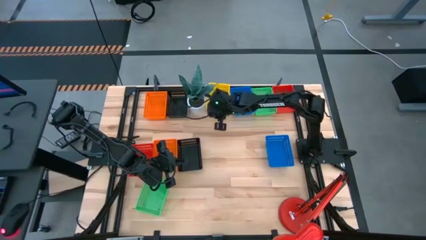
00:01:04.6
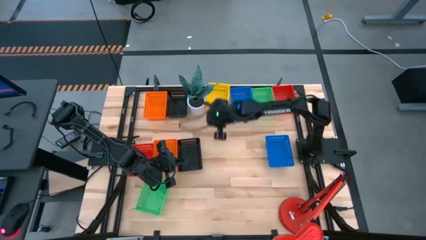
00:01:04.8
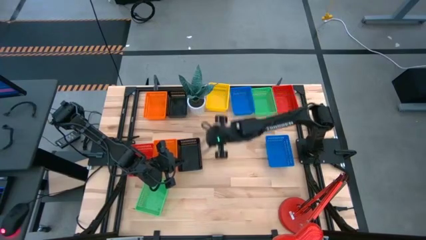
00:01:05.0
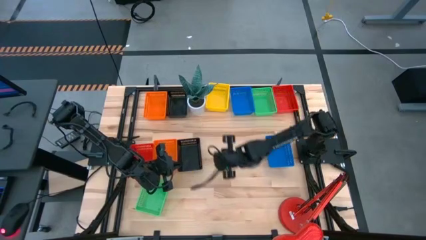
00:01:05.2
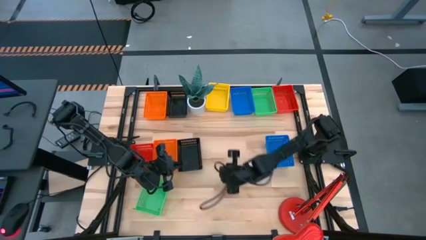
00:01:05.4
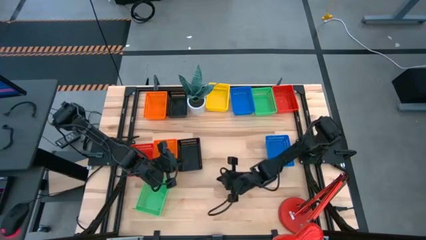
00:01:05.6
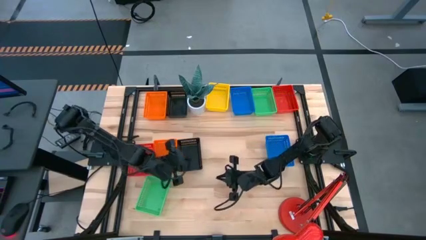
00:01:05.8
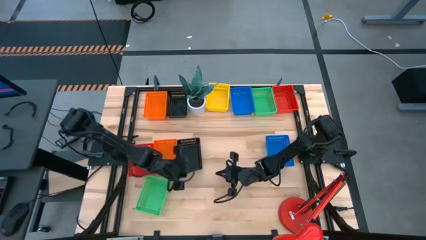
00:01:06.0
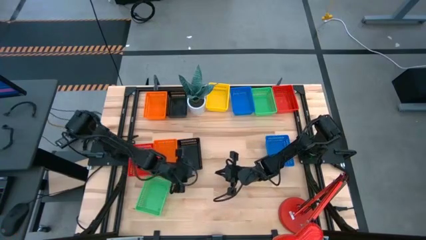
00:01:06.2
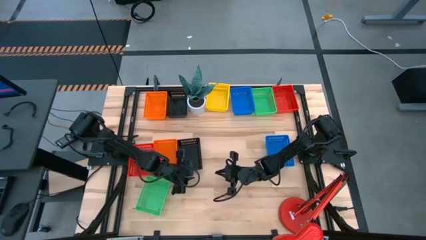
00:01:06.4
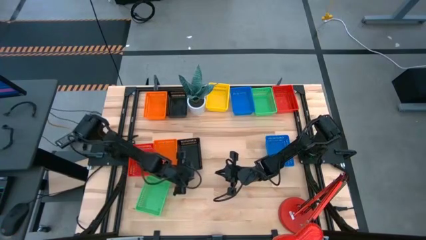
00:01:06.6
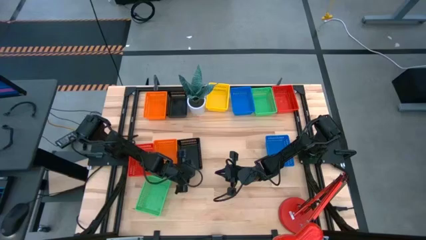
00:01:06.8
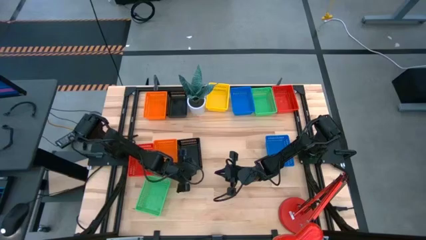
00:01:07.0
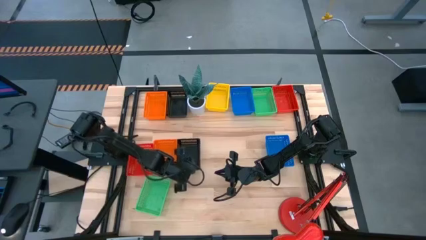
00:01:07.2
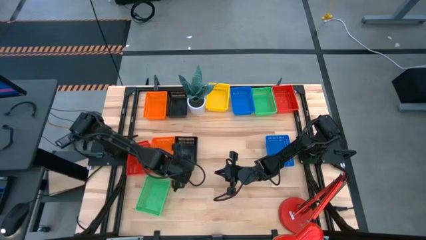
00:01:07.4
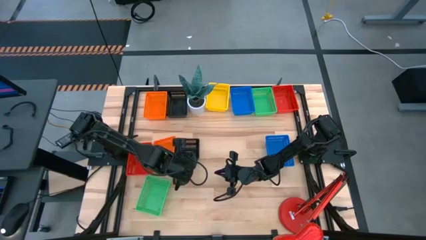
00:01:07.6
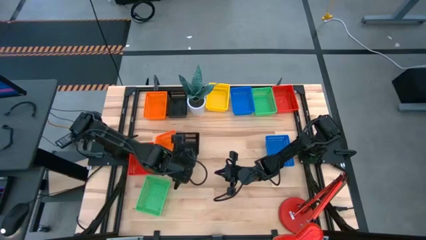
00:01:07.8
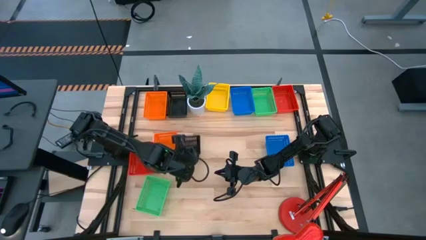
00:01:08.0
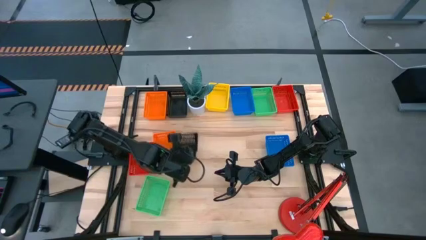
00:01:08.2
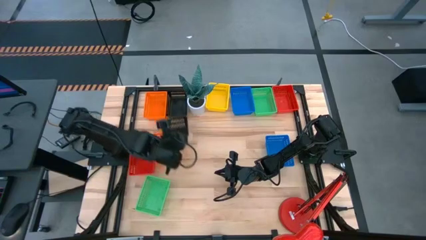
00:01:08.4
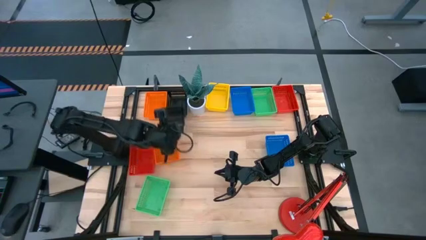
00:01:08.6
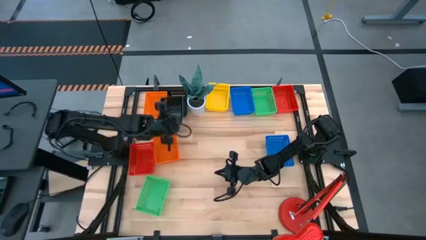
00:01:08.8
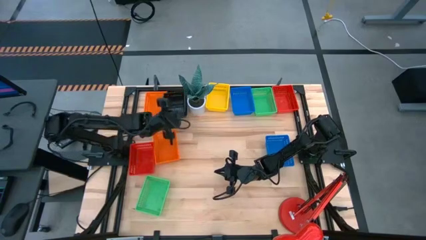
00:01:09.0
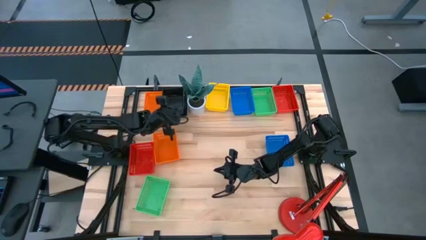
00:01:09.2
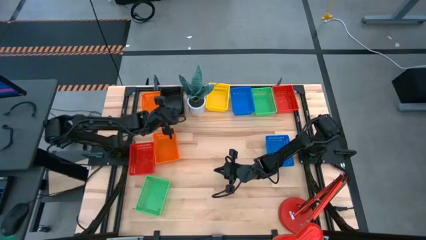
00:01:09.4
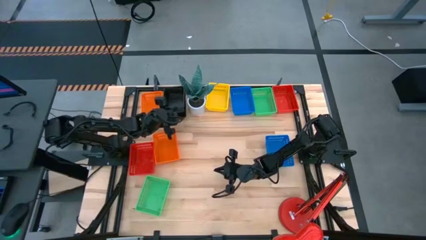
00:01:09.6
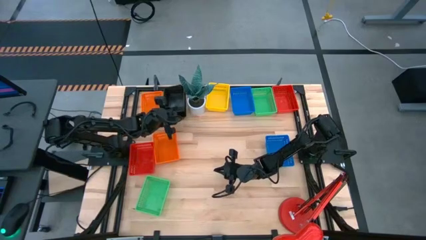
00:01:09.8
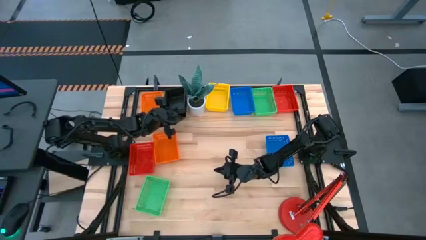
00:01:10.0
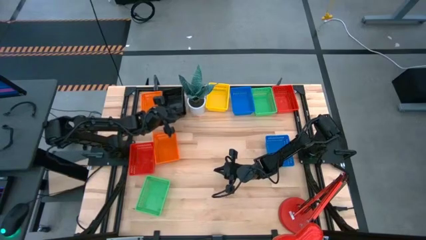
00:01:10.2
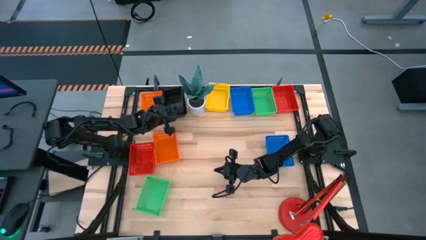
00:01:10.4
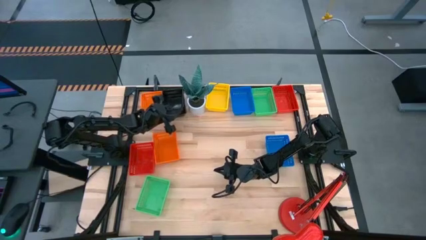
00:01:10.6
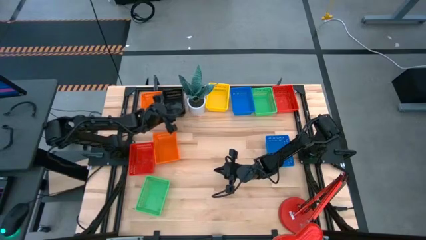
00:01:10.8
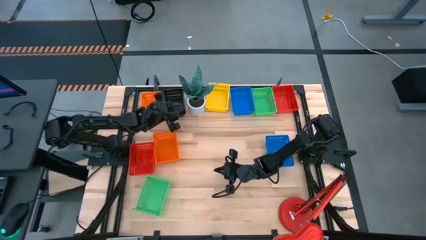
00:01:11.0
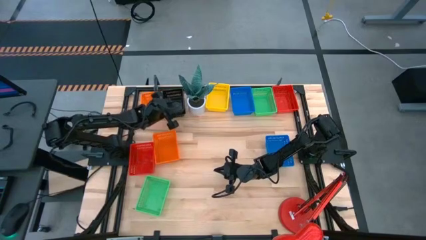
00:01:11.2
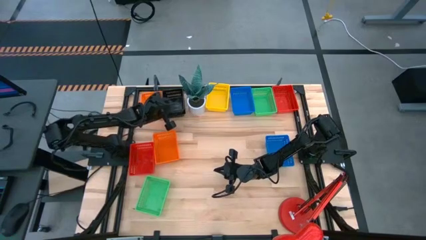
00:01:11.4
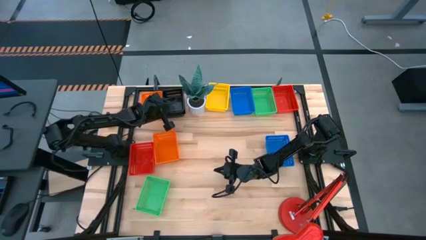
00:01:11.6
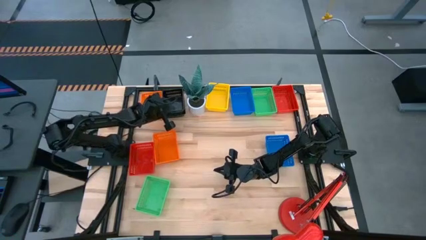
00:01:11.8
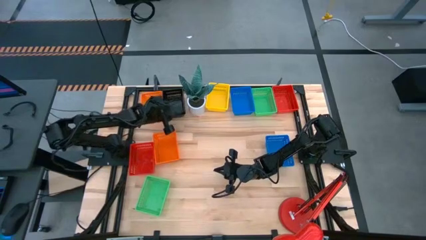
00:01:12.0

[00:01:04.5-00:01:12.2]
Stack the bottom black bin on the top black bin

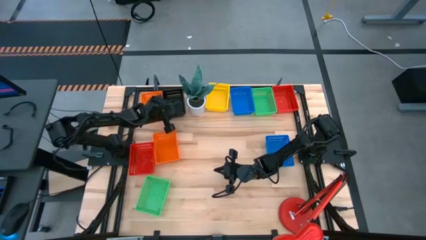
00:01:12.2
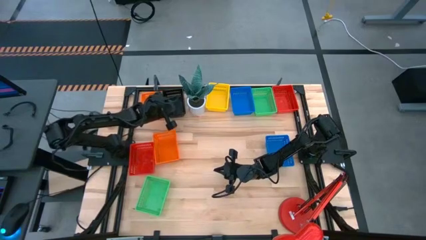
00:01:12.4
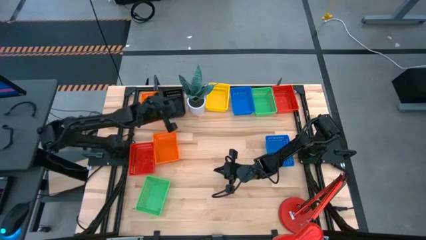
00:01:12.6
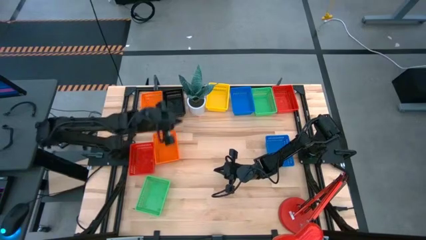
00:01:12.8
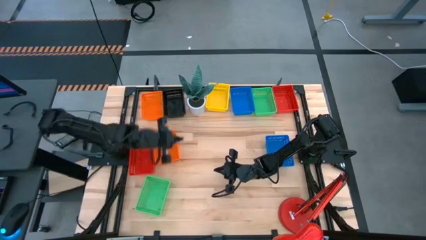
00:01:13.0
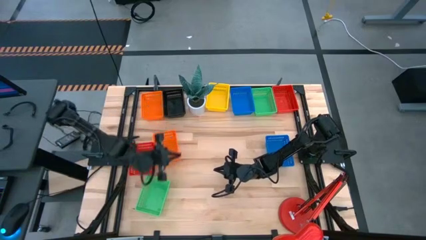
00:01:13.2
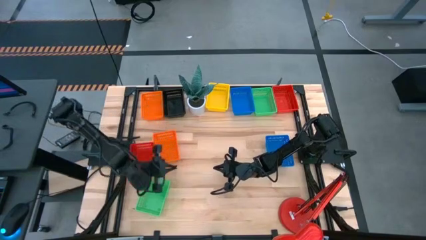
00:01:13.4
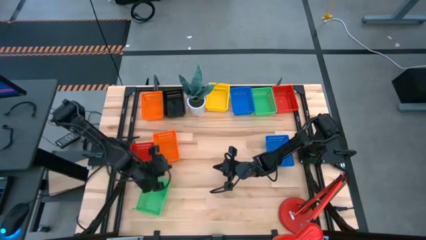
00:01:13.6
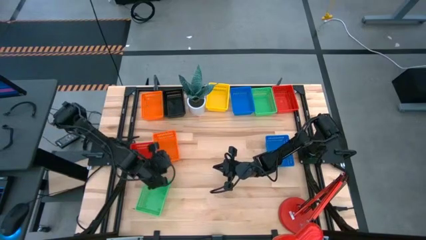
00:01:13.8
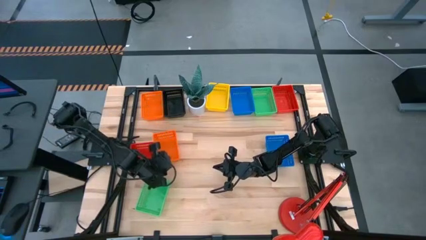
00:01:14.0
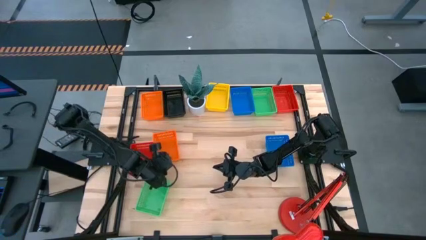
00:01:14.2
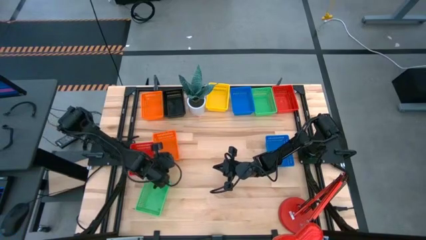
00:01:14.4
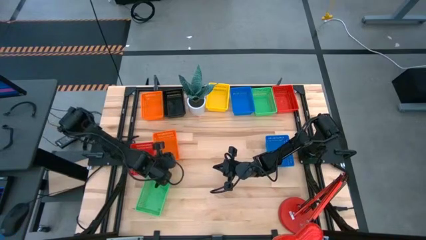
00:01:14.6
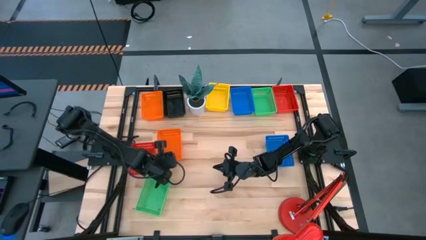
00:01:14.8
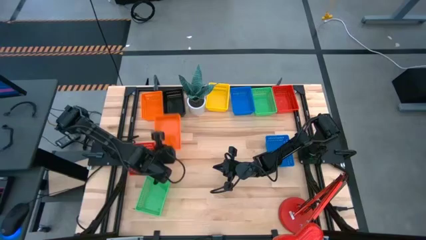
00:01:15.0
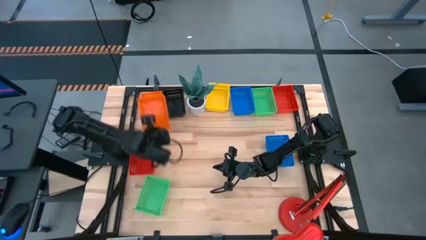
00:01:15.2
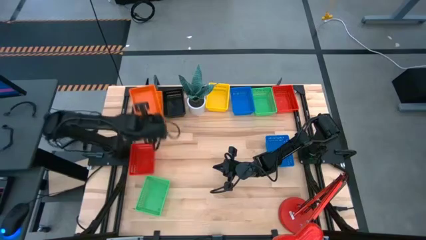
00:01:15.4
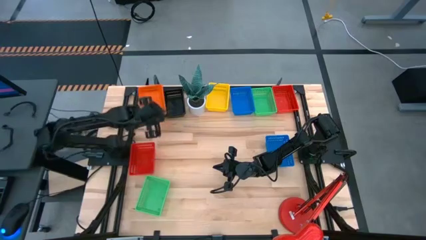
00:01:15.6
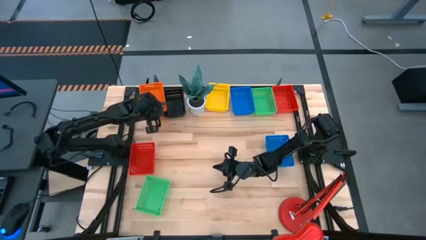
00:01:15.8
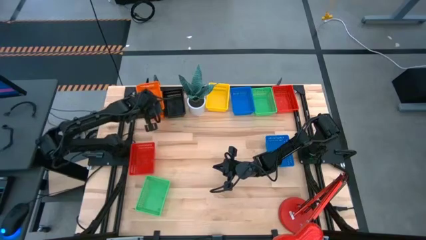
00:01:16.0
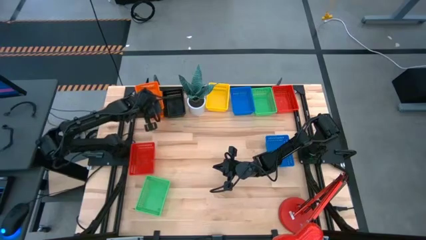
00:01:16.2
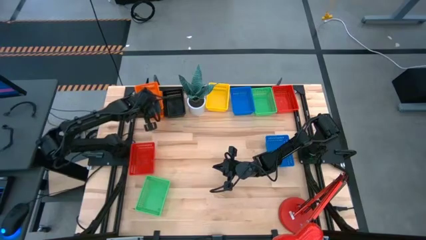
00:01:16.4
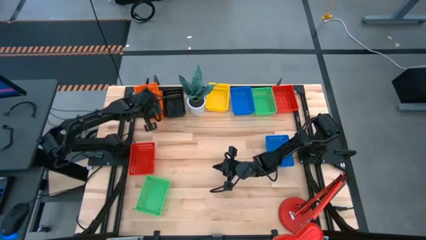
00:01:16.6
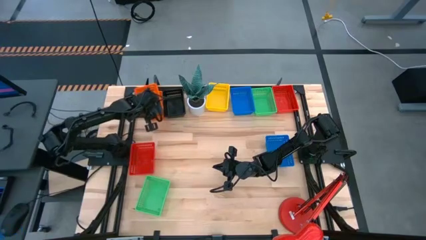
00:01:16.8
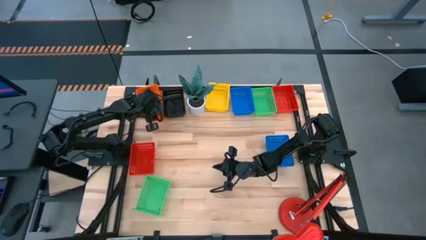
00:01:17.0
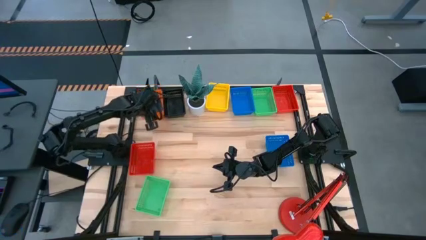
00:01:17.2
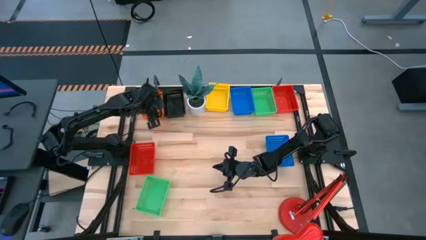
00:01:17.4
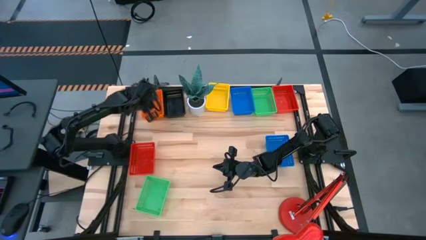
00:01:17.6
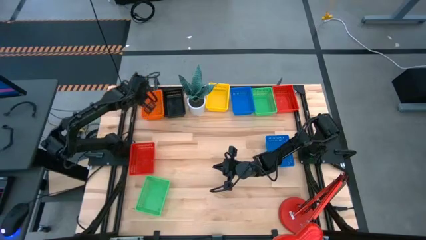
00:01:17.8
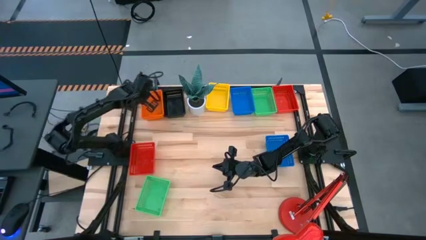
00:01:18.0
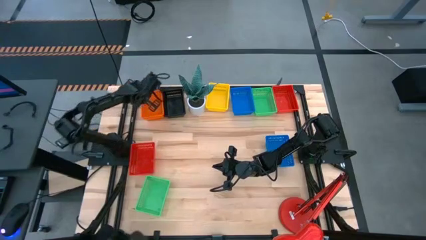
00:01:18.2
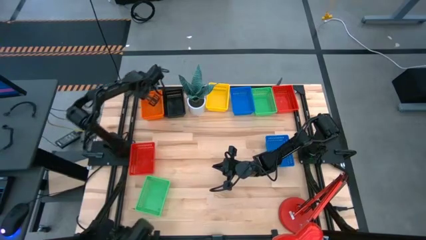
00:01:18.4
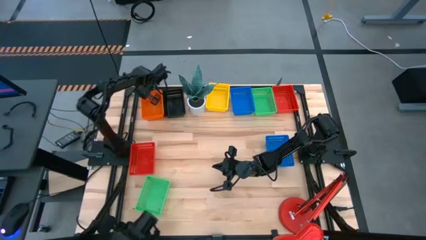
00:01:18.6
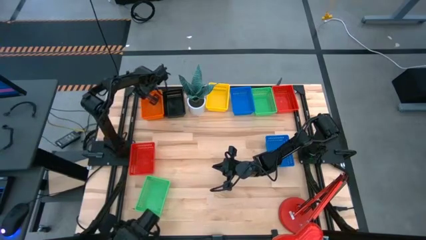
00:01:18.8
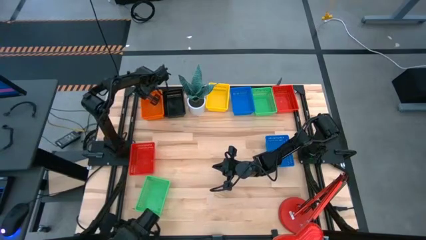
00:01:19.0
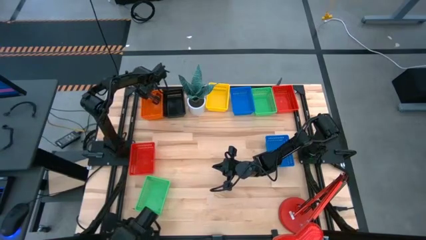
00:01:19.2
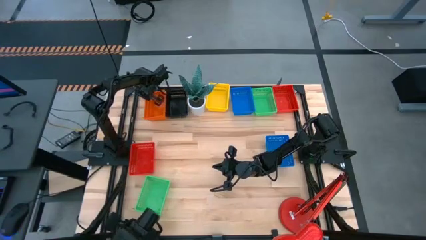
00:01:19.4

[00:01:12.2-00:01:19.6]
Stack the bottom orange bin on the top orange bin
